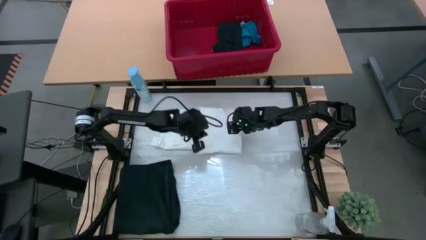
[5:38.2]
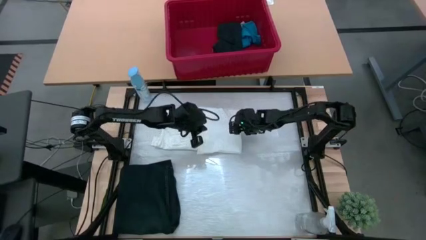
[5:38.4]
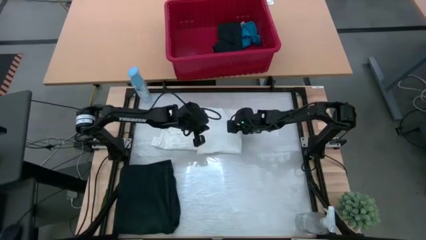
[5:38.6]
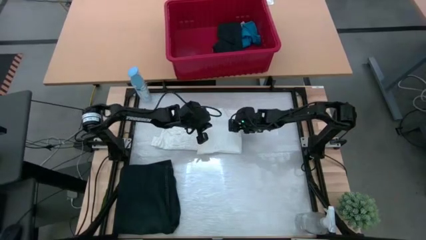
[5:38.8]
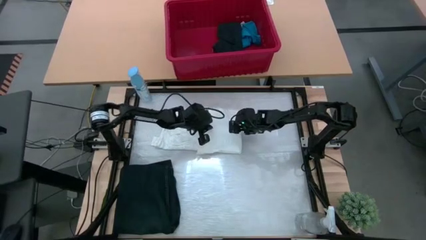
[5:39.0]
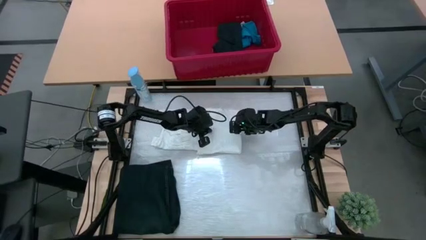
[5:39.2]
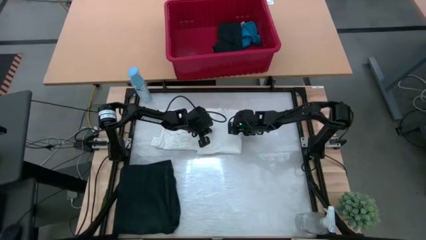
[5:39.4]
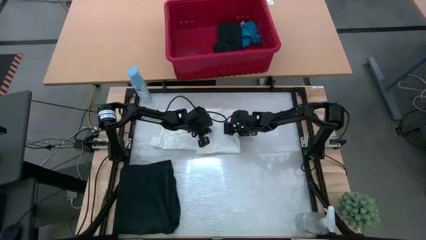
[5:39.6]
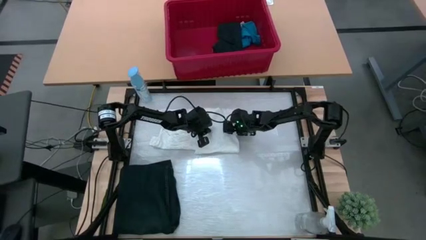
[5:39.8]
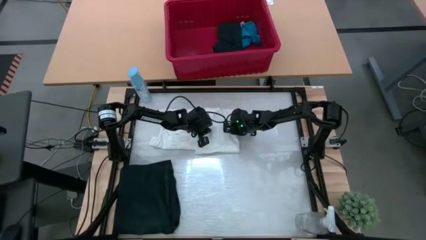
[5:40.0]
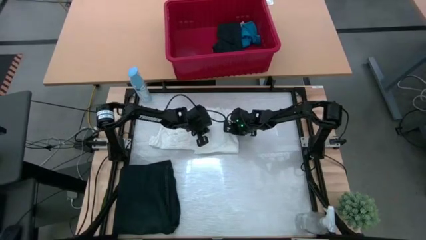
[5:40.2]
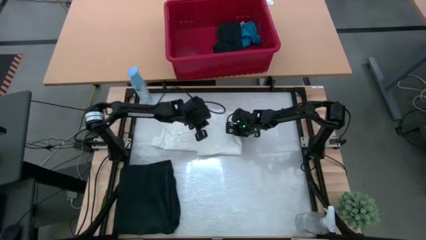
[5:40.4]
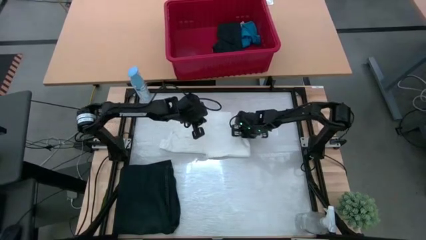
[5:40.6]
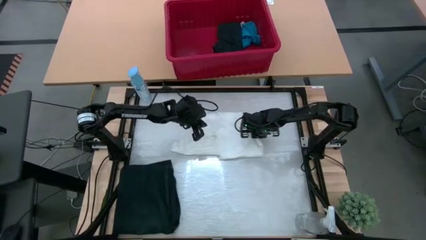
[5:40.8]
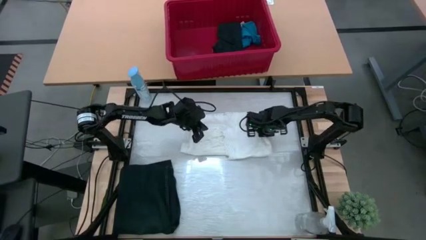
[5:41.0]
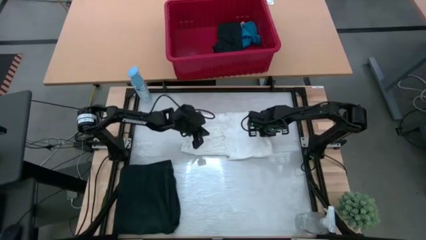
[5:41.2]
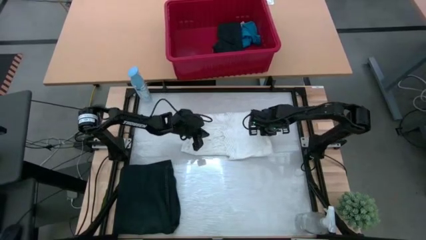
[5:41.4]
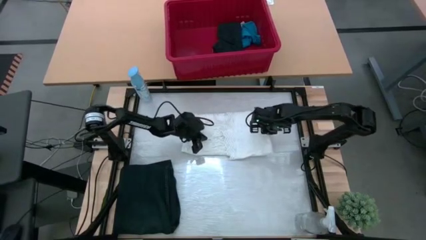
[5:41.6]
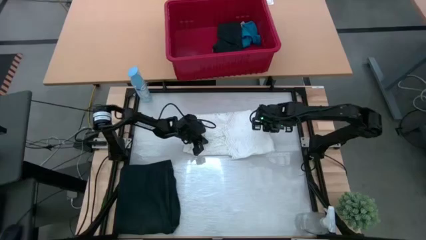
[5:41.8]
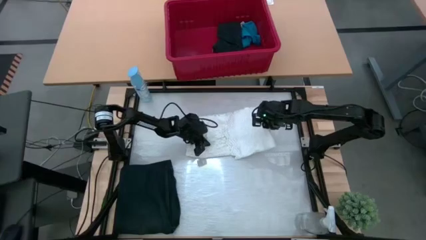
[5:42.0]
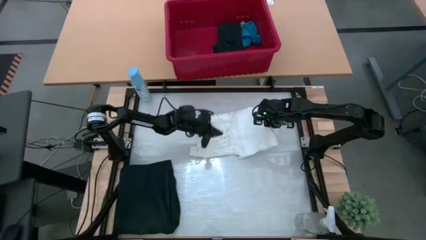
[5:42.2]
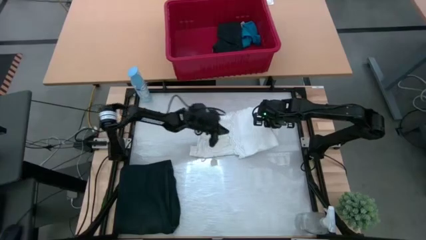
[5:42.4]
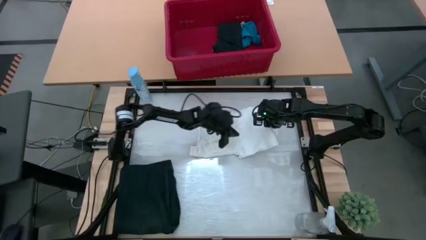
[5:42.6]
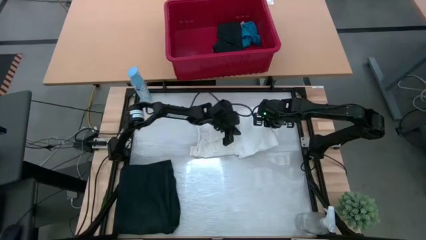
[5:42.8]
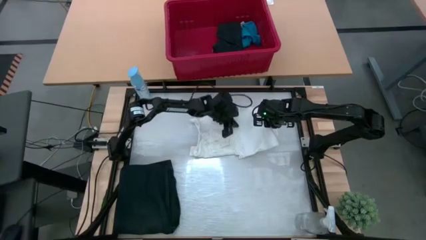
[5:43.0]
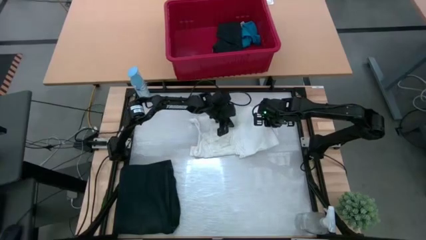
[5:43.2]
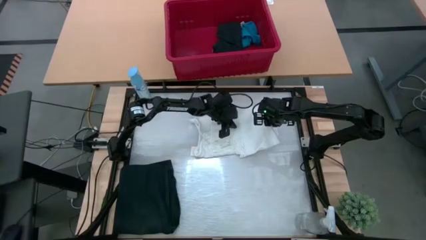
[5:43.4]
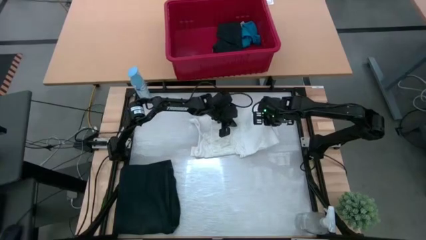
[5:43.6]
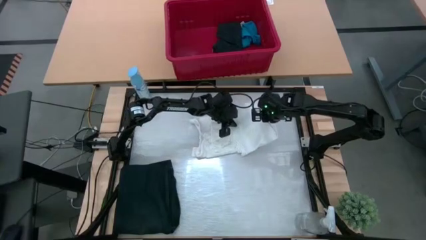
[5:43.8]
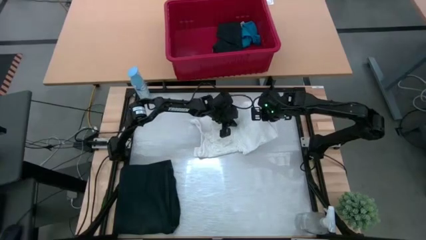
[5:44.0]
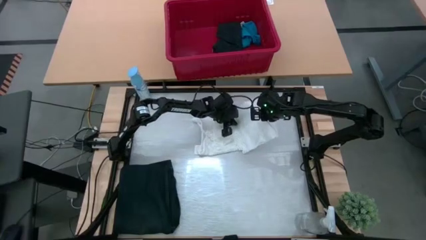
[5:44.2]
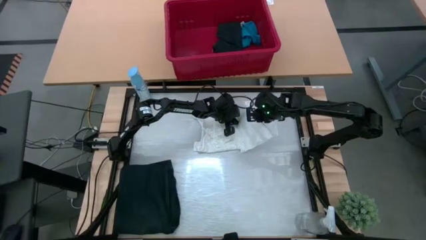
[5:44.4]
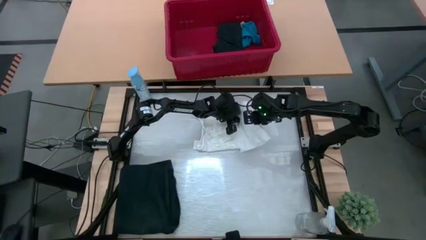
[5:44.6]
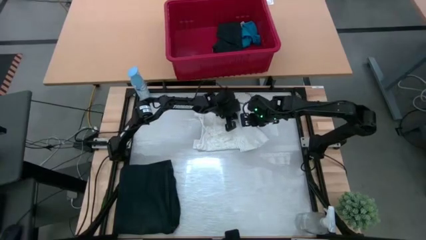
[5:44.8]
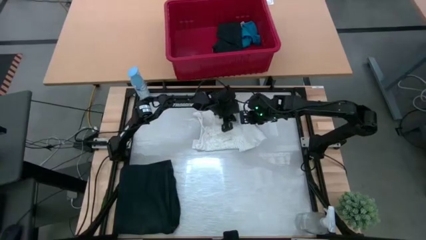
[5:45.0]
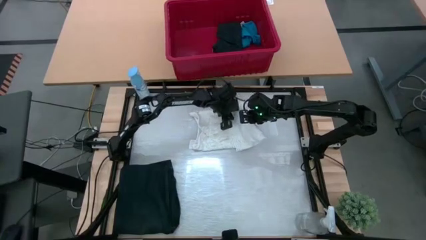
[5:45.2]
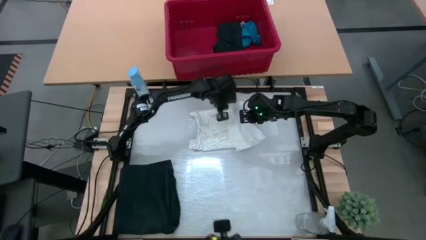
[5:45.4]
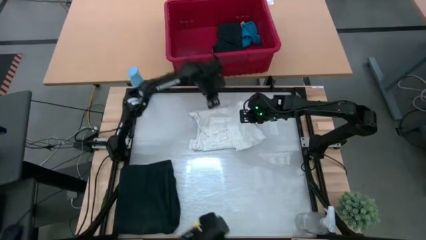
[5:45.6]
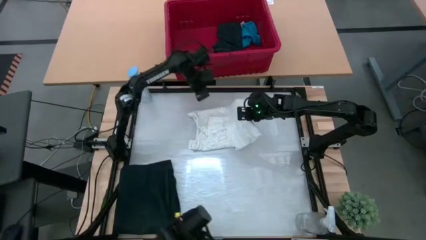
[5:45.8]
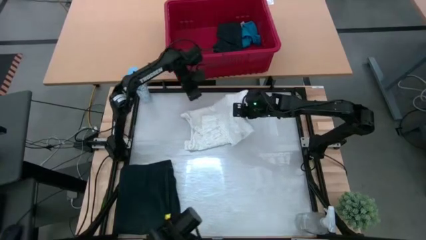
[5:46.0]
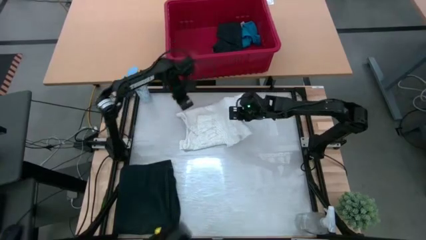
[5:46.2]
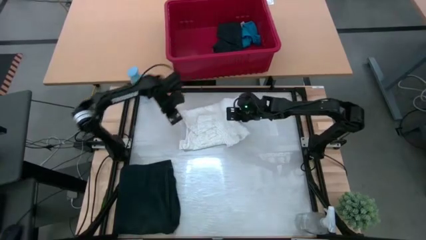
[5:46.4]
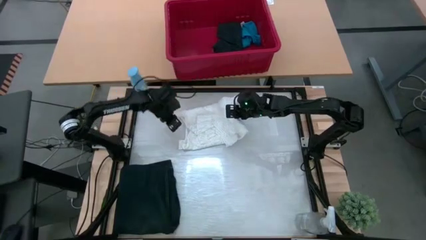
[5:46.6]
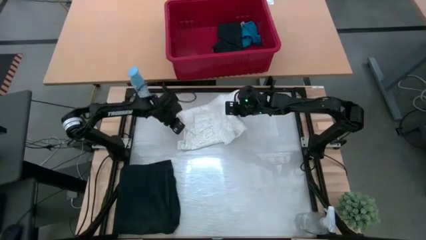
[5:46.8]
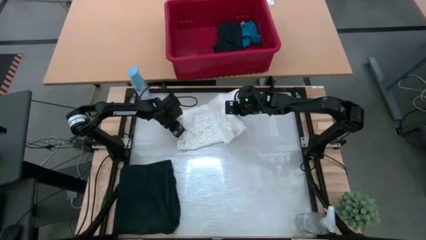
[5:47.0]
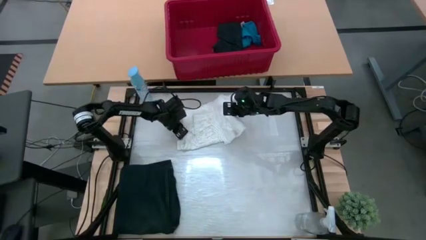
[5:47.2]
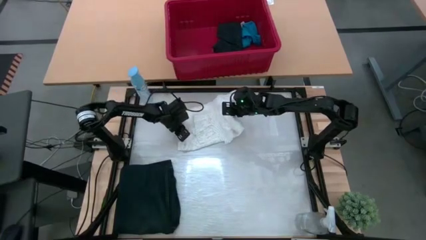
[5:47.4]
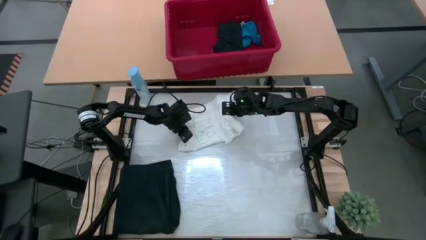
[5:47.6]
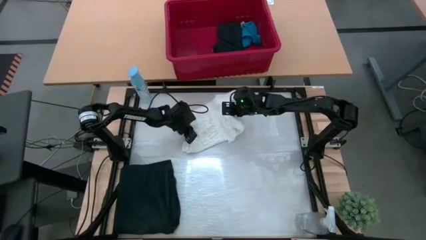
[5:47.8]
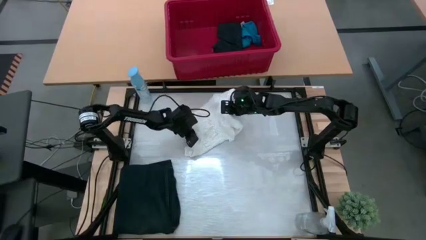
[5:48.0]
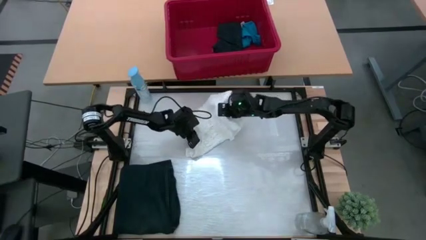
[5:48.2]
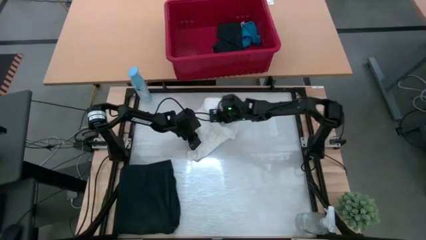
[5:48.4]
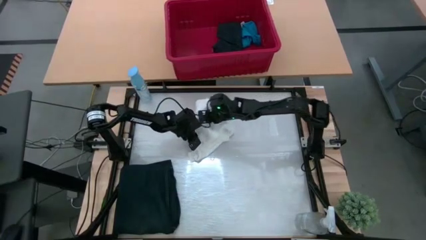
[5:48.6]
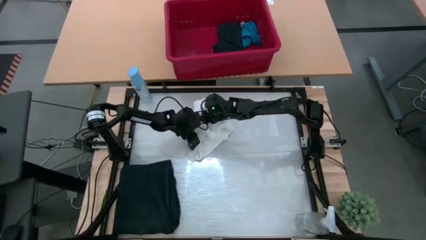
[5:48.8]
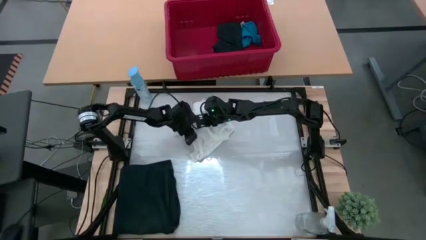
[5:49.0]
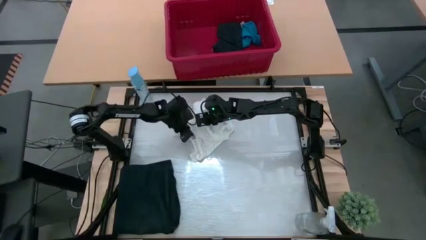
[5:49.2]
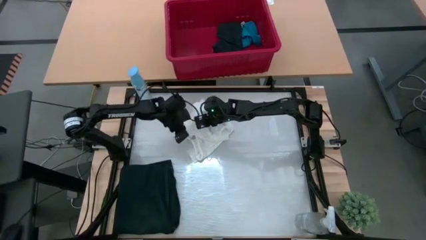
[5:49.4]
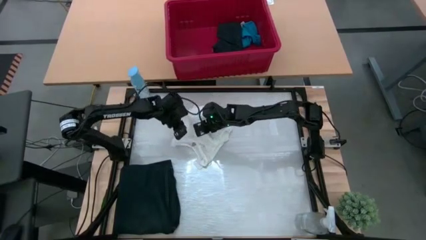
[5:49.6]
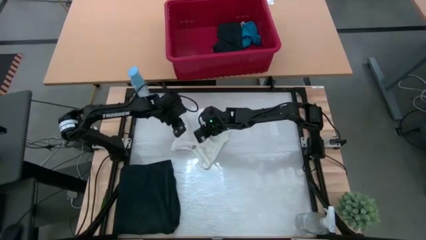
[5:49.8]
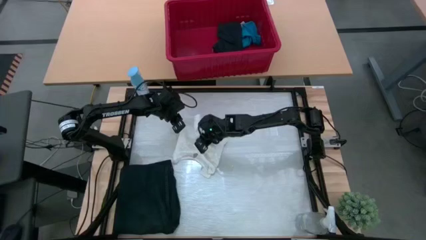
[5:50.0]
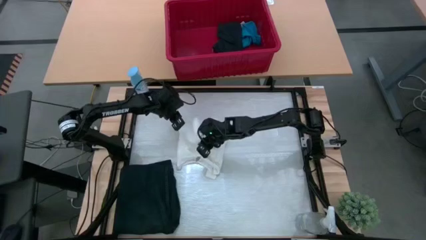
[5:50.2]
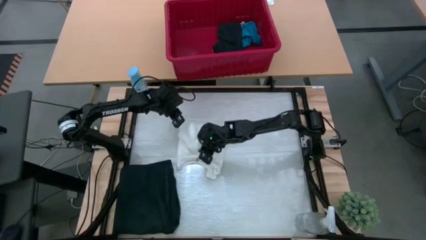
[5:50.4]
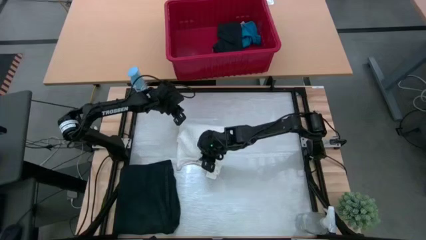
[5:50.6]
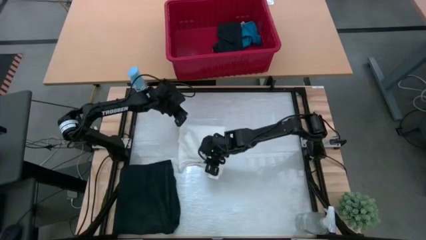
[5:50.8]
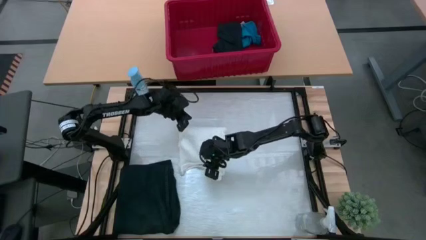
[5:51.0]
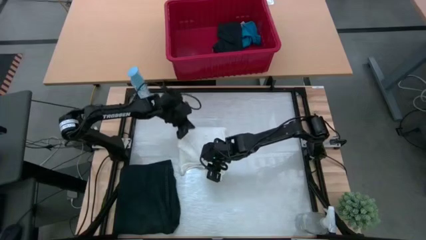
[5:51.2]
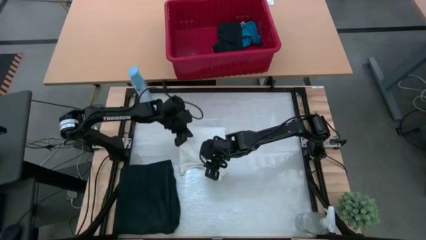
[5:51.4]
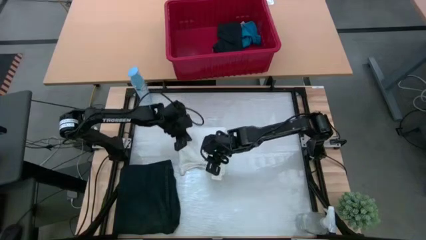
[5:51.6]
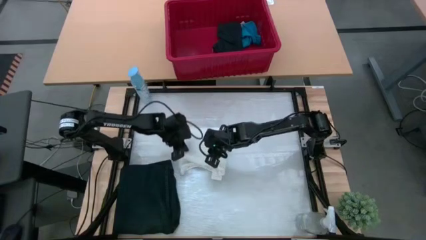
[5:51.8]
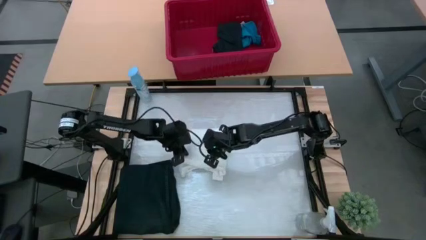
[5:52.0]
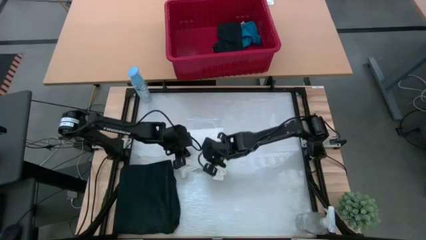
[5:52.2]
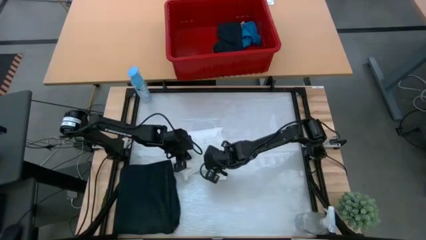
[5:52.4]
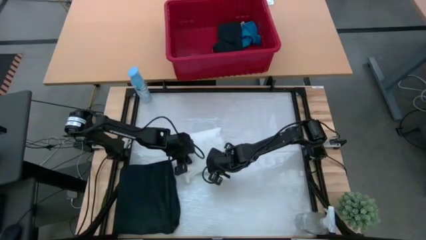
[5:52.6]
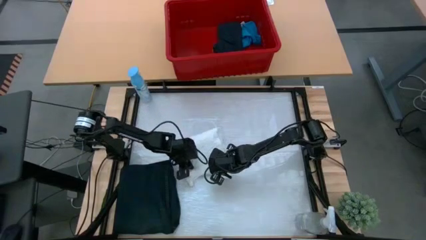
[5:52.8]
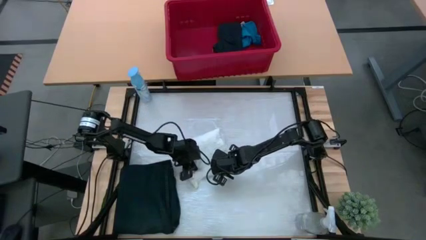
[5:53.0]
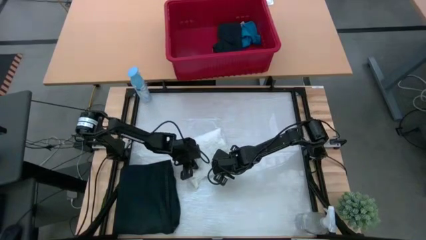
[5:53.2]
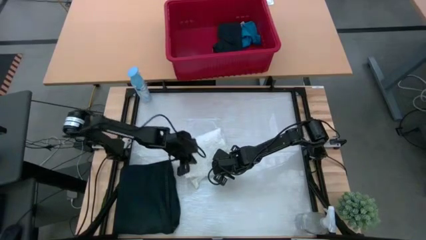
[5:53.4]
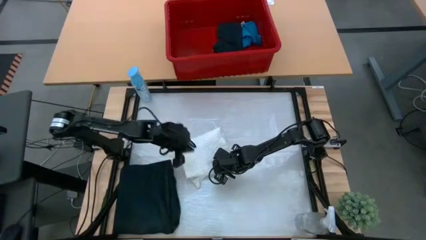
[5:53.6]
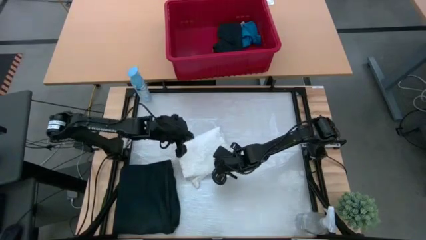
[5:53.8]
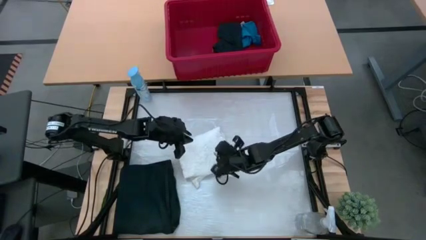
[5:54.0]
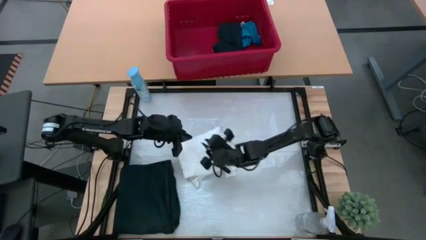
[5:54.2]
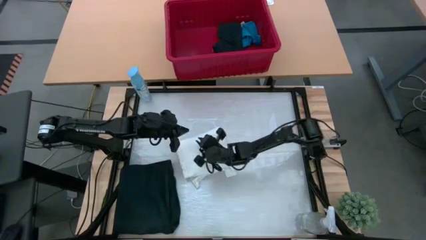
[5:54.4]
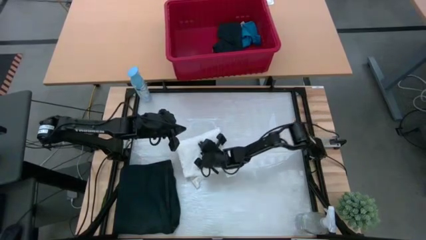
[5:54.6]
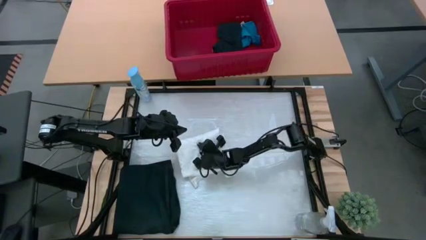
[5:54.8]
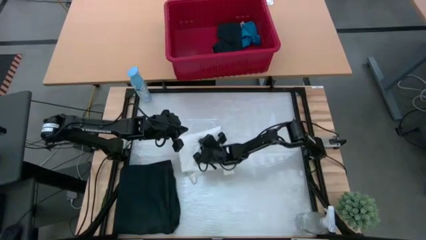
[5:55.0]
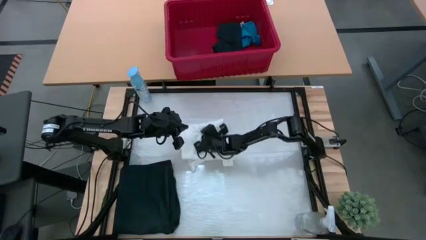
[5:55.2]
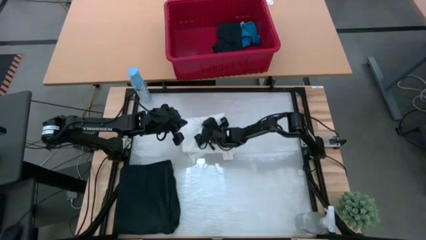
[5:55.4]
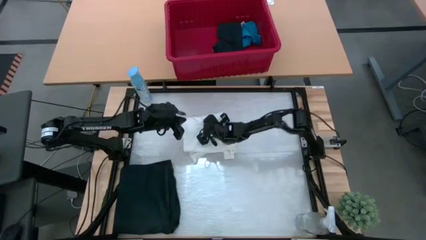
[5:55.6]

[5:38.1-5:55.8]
Task: Fold Laundry from Bin
Fold the white dress from the red bin
